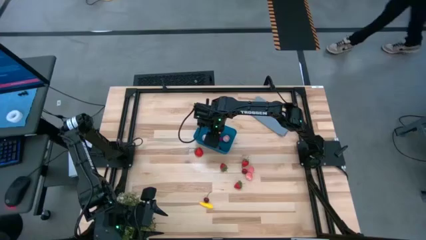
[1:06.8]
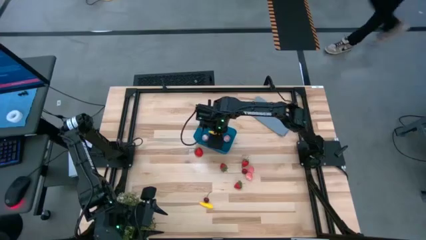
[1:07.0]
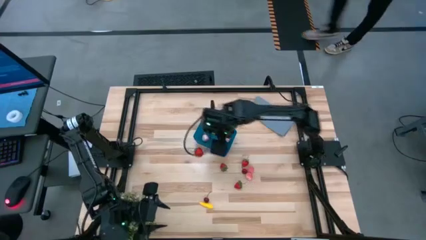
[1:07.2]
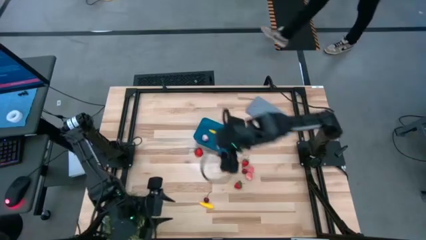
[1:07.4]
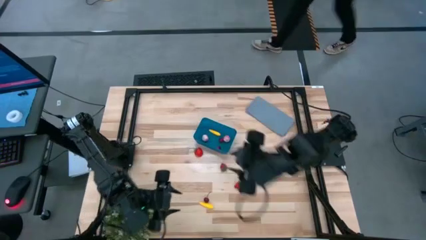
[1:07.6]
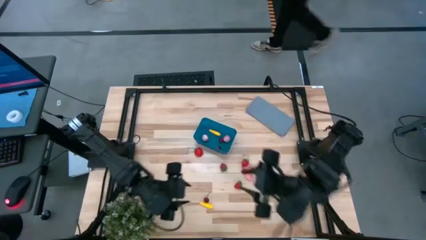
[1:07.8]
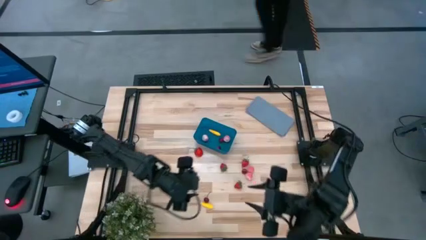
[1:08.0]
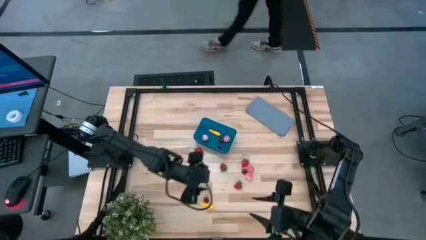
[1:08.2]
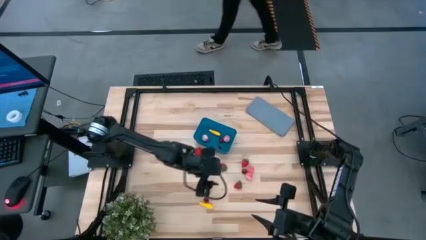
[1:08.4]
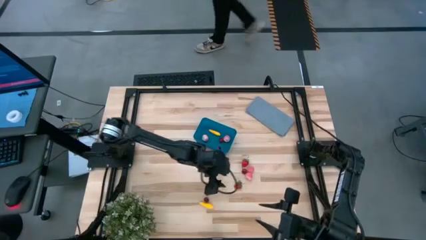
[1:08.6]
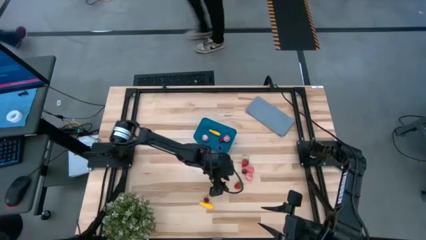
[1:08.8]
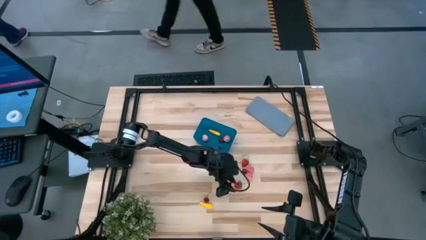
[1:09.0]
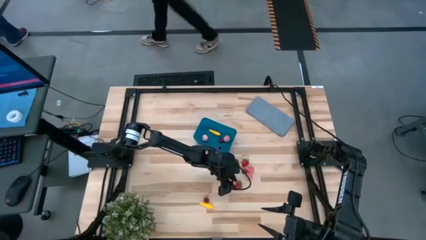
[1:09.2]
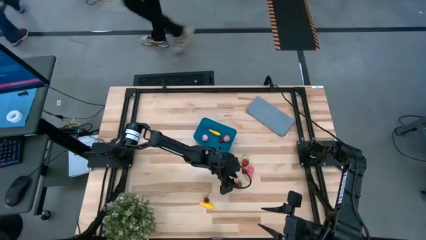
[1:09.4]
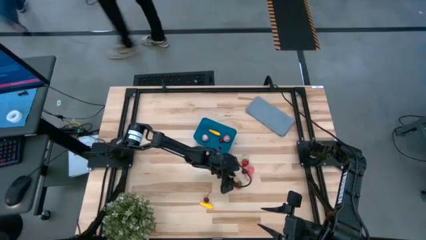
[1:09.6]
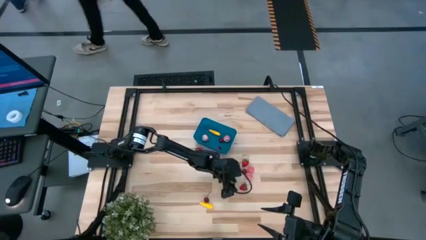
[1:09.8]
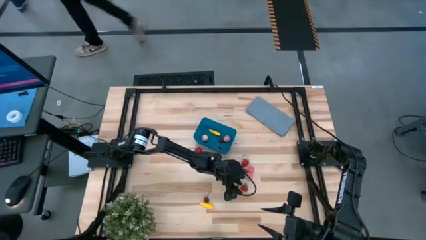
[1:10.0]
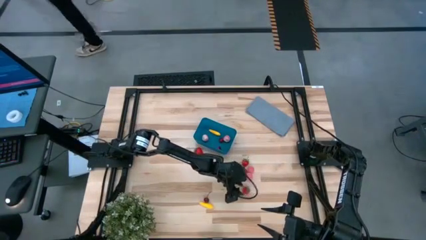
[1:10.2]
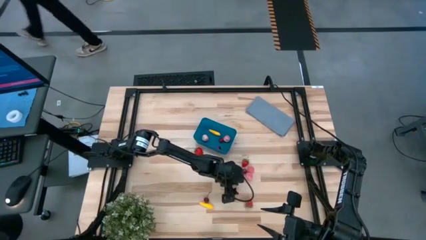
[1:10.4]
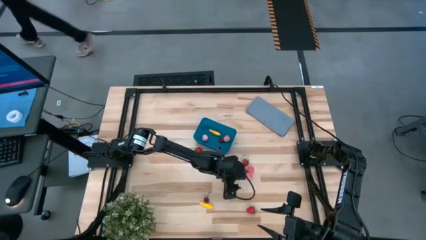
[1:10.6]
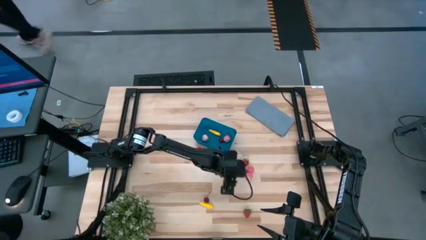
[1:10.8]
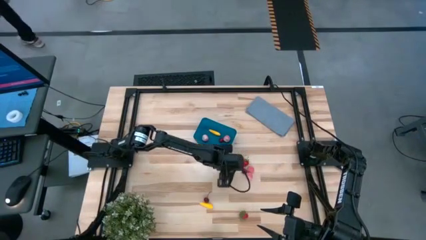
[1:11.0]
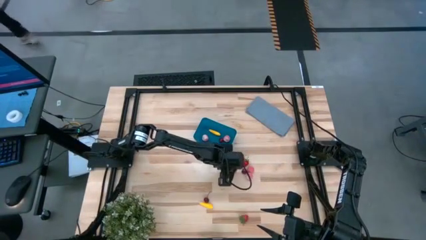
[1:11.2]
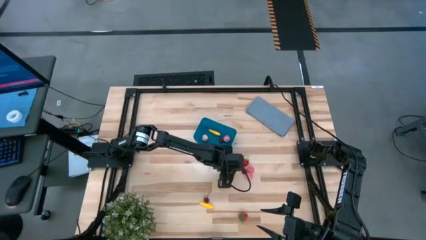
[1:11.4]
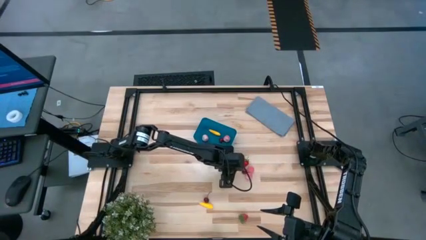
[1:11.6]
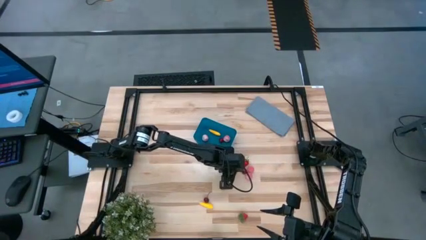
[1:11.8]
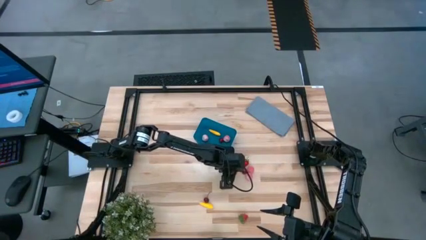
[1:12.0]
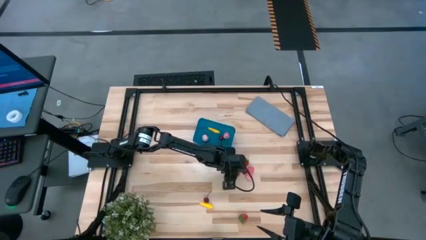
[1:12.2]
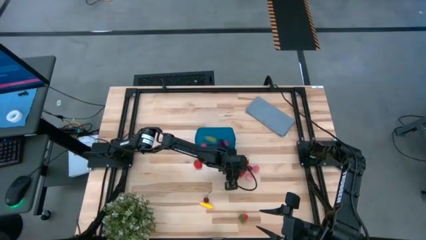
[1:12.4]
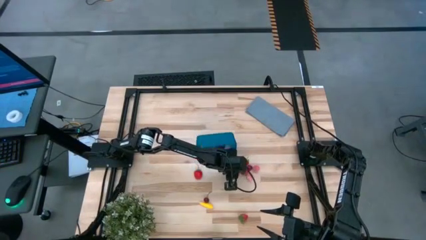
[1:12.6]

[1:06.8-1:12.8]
Task: Pick and placing Produce into tupperware
Put the red strawberry into the blue bin

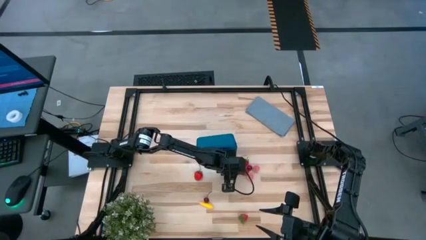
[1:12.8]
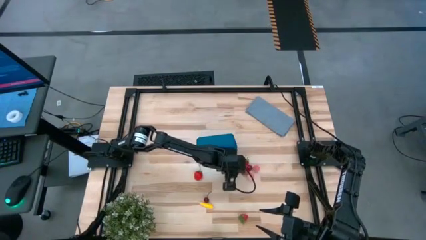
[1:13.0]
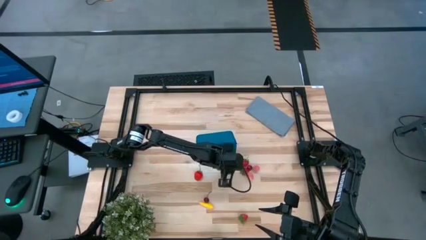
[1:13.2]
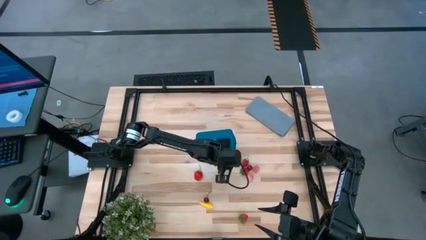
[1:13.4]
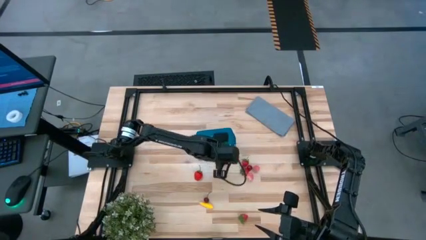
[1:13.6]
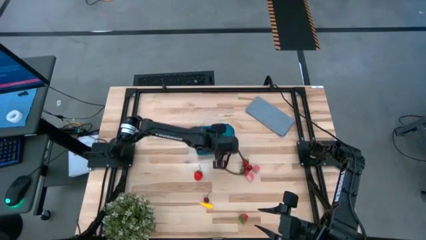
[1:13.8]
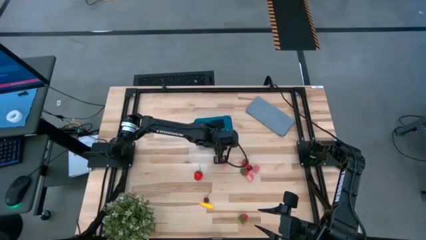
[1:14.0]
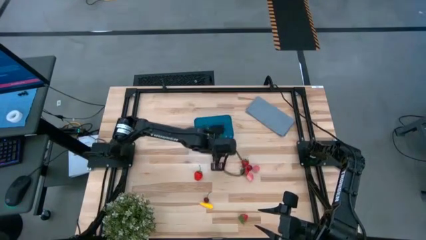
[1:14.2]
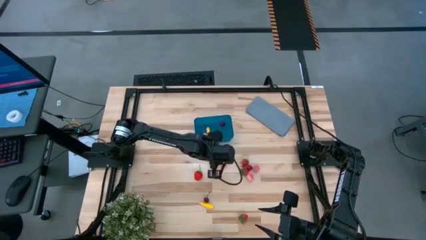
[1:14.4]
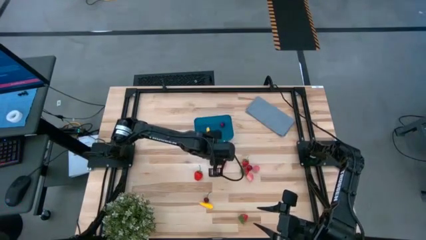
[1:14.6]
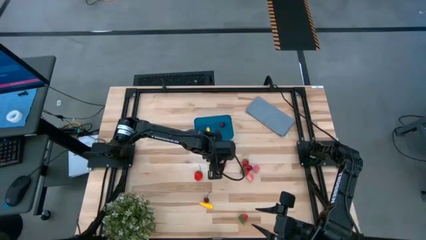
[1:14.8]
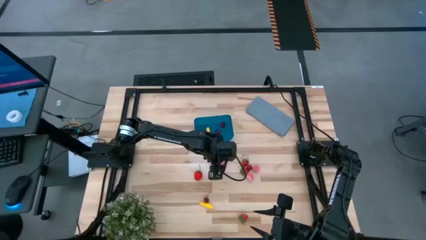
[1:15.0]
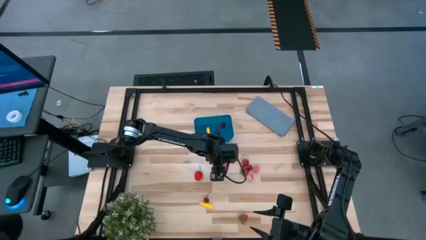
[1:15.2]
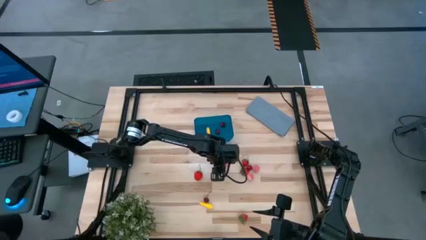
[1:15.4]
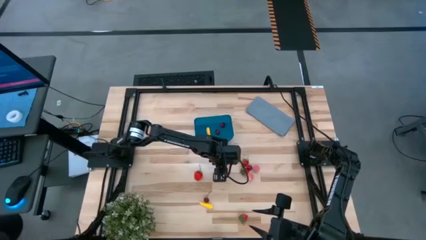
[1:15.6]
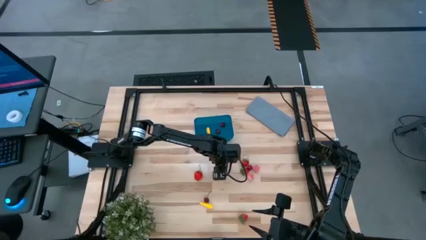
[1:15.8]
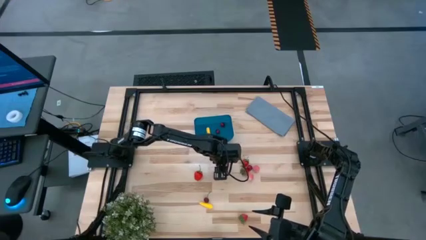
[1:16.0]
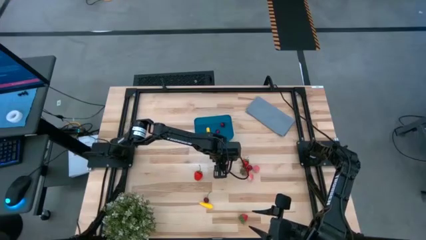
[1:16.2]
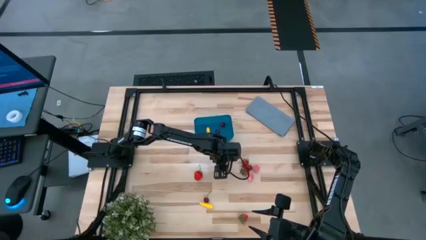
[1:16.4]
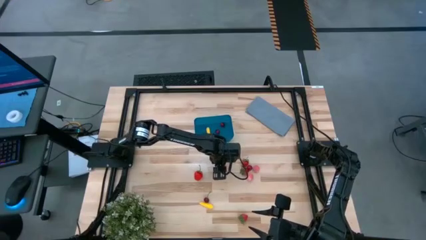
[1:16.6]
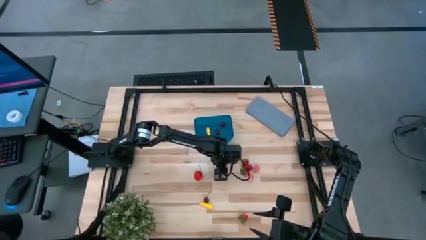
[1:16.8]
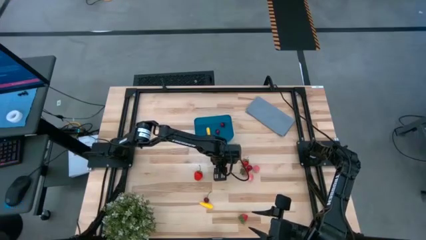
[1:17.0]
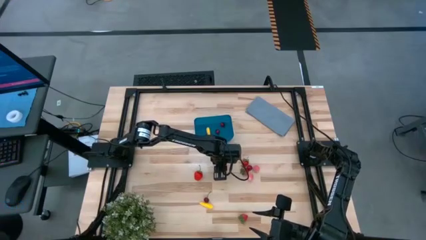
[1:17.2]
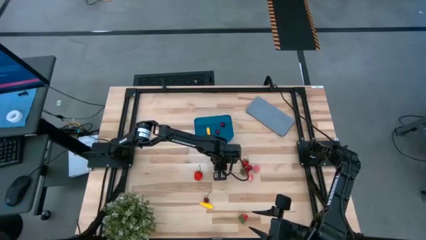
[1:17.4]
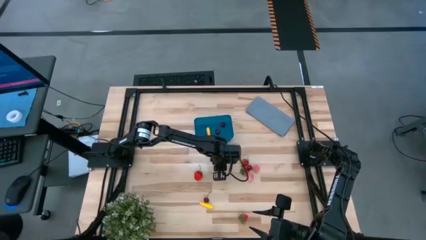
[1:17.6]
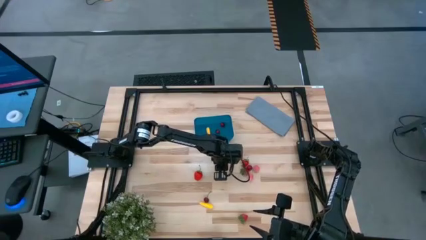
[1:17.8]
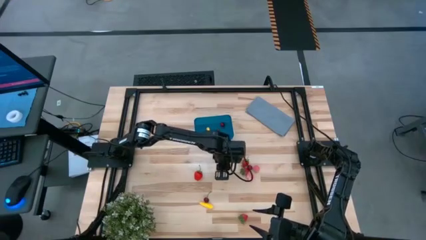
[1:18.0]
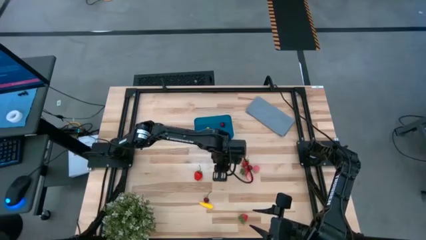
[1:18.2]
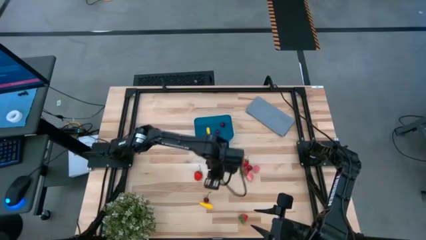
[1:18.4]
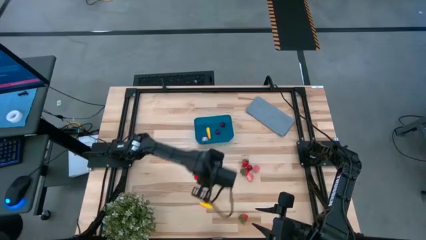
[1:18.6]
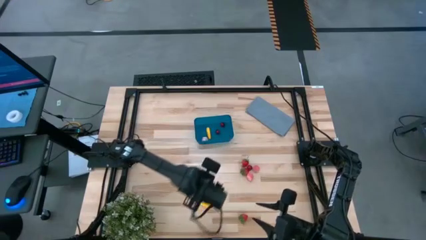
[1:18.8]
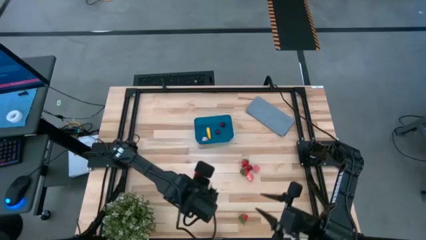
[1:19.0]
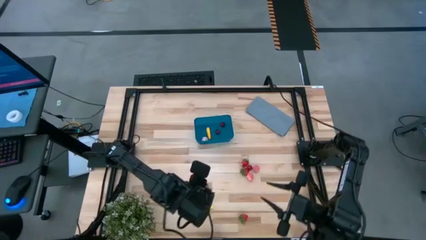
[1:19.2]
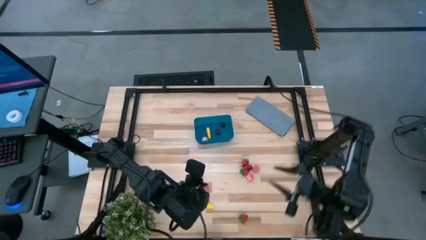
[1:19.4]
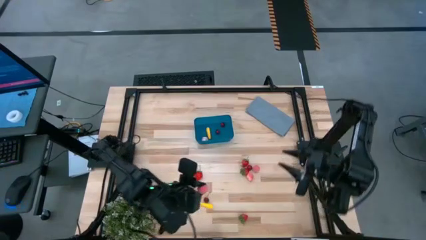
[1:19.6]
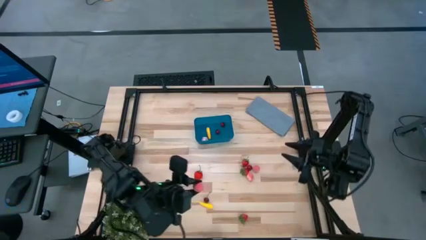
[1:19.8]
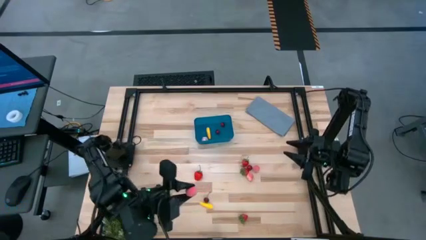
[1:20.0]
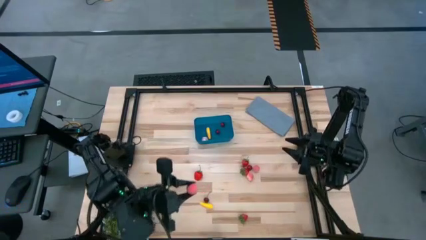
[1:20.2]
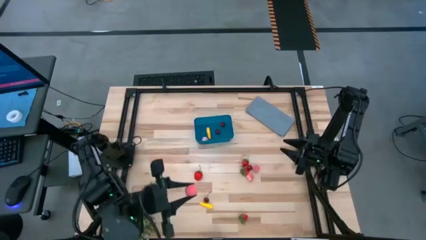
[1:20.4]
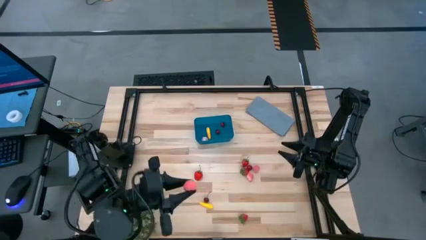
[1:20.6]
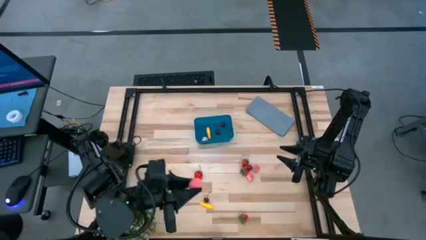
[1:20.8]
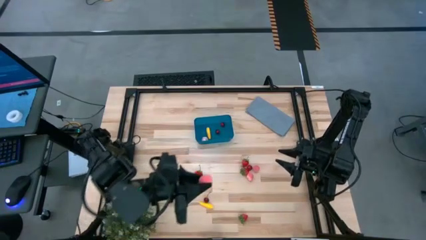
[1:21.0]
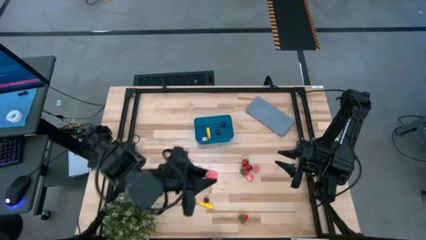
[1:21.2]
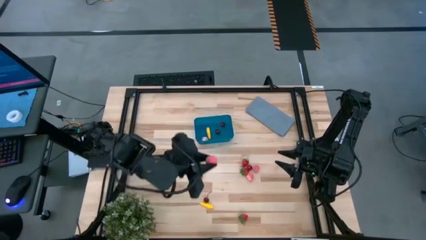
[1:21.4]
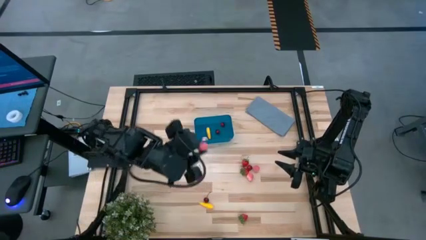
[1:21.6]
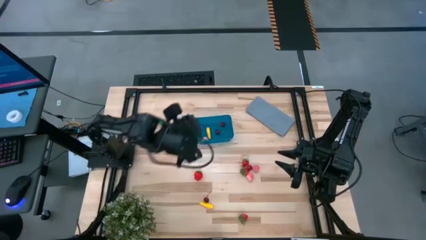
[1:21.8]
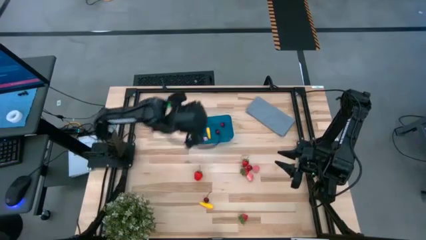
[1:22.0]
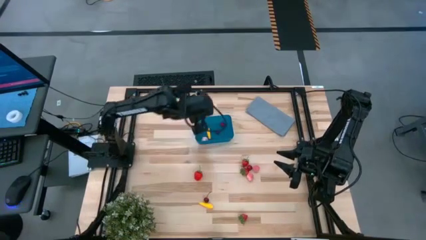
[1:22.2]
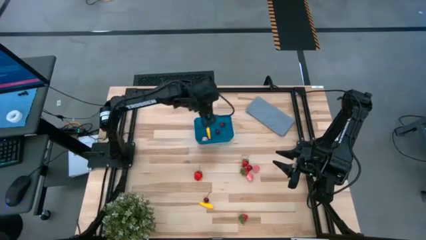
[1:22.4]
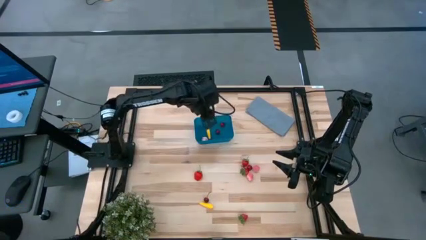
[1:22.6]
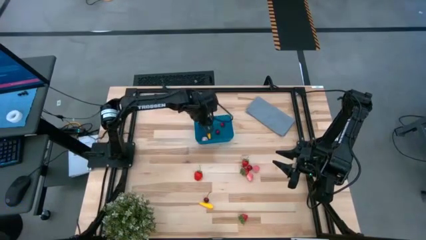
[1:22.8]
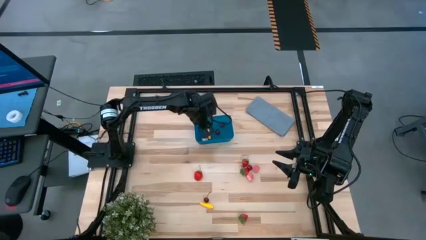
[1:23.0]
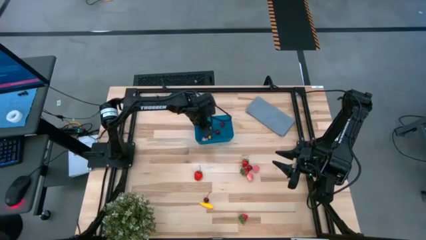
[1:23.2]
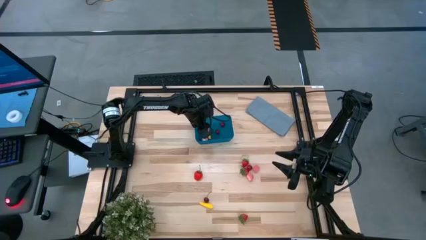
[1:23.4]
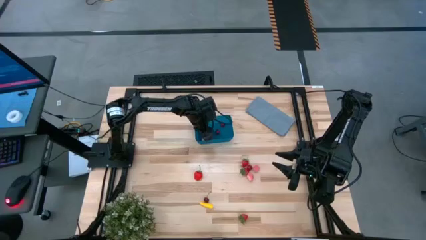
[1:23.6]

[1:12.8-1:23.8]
Put the peach into the blue bin
